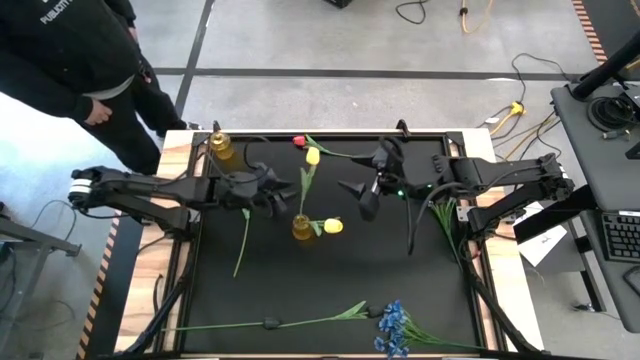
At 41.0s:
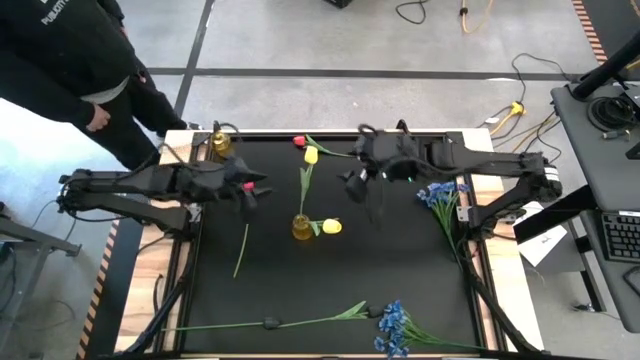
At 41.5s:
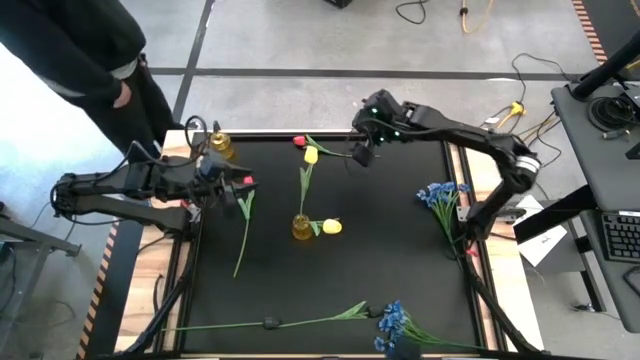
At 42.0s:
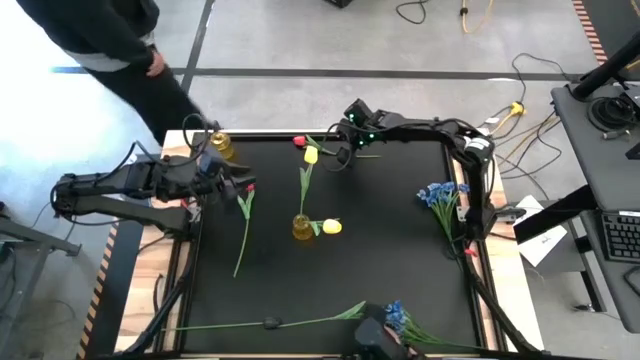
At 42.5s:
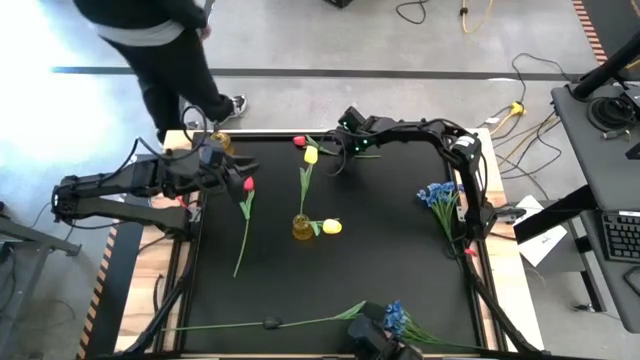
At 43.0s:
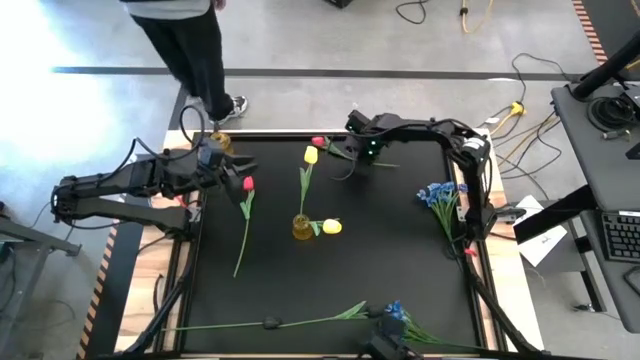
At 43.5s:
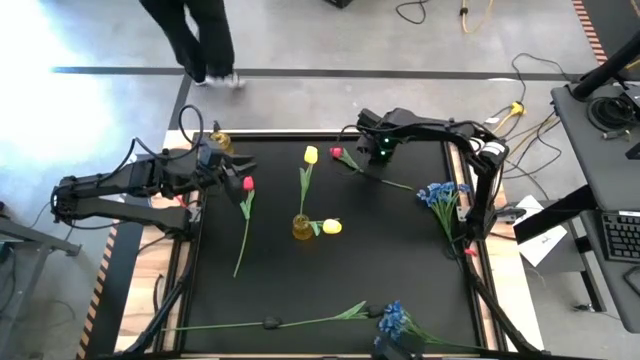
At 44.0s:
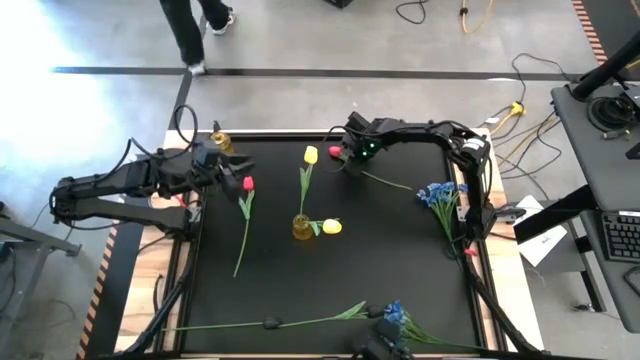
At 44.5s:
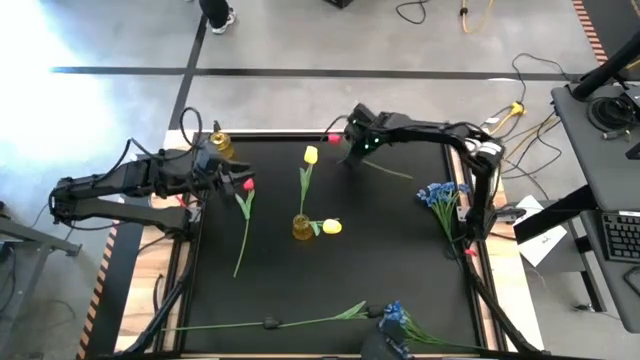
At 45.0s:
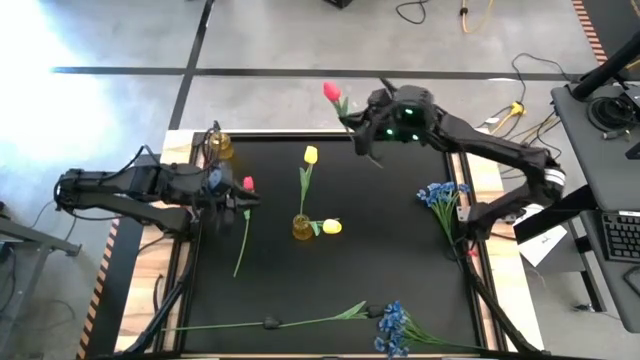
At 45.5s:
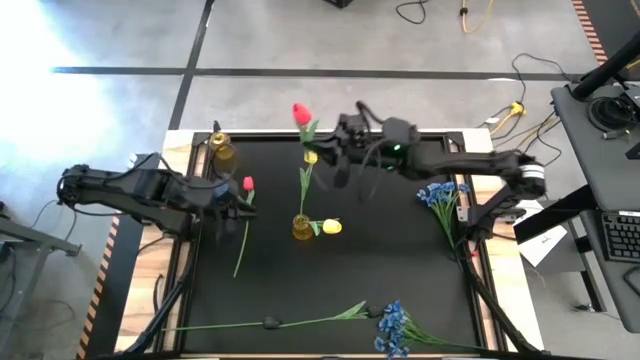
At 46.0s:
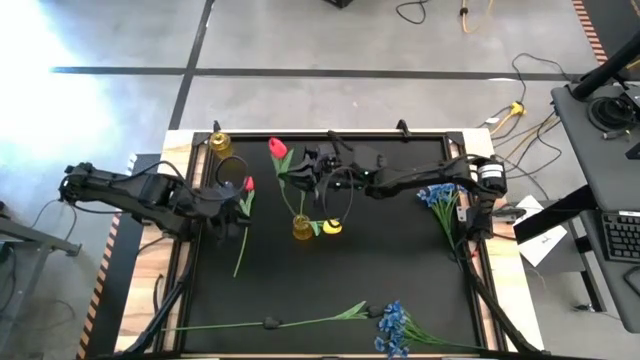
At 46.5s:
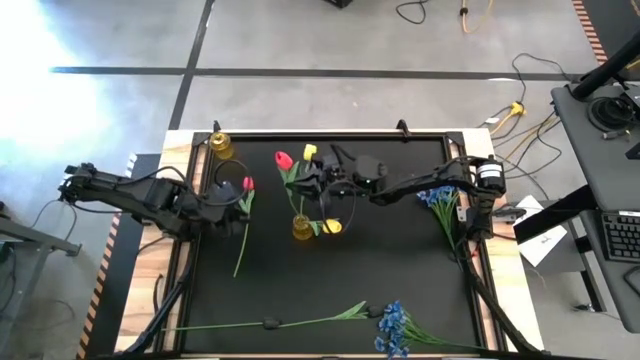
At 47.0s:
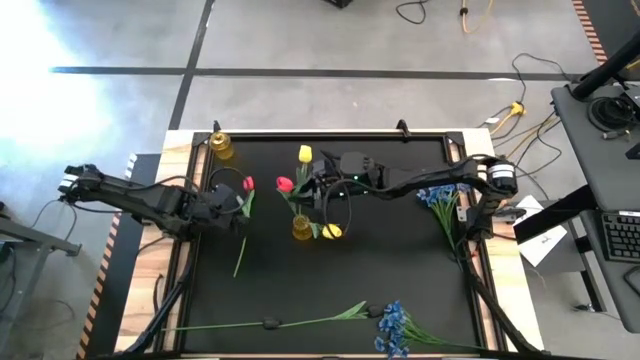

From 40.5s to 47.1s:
Task: Sort flowers into vase by color
Put the top red tulip into the yellow vase

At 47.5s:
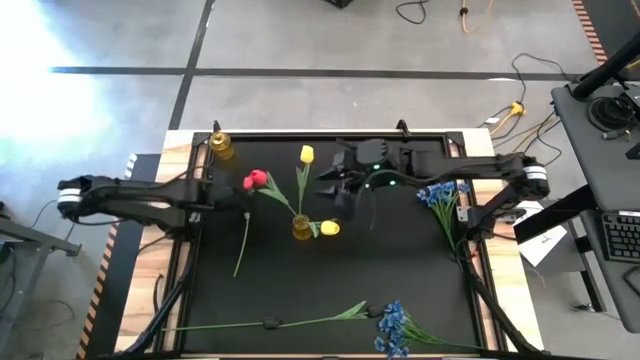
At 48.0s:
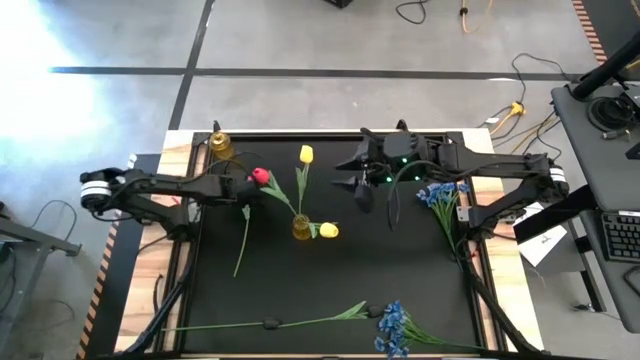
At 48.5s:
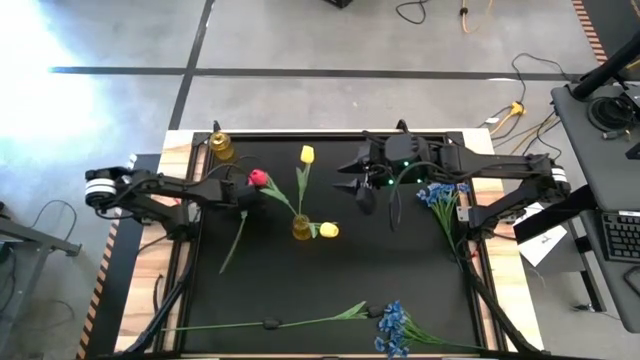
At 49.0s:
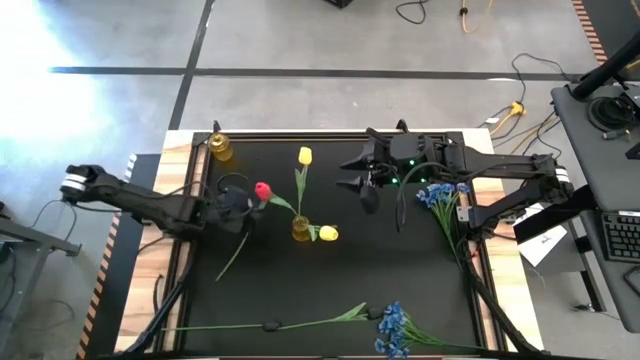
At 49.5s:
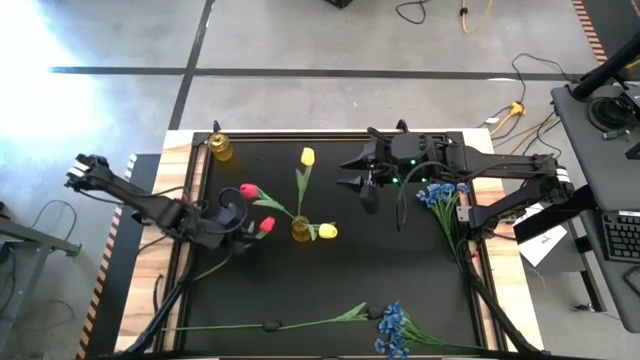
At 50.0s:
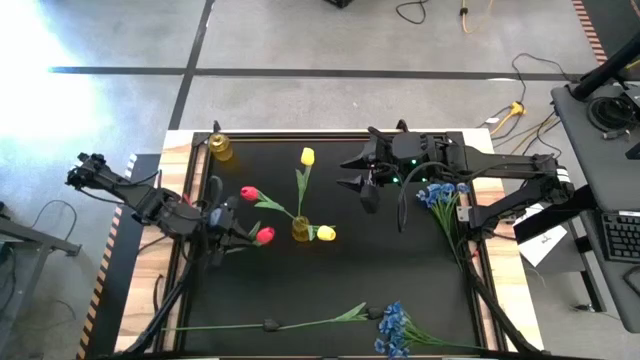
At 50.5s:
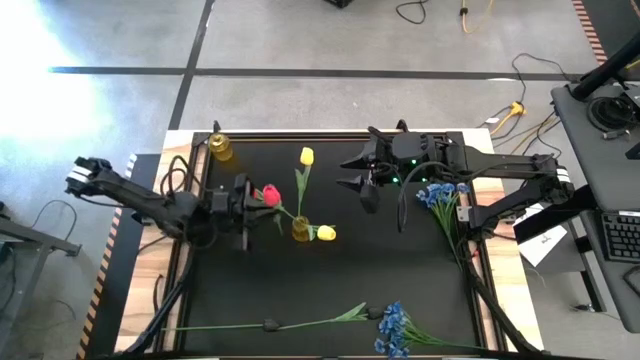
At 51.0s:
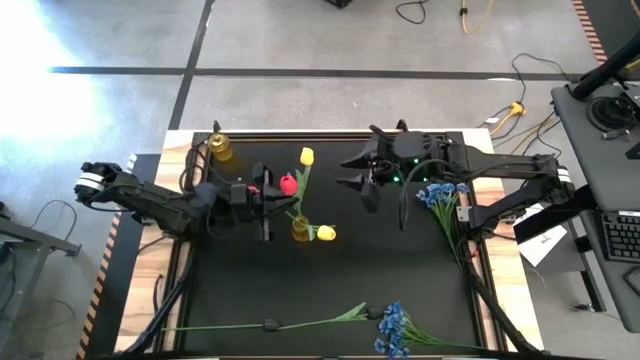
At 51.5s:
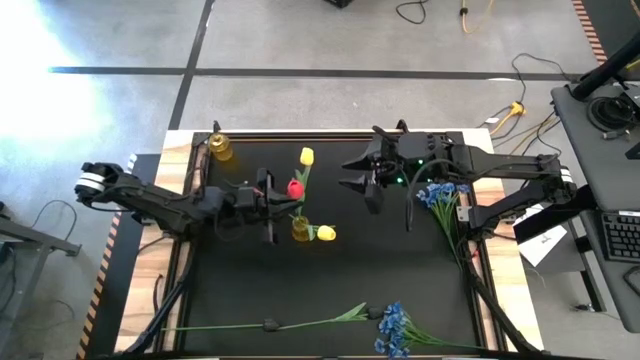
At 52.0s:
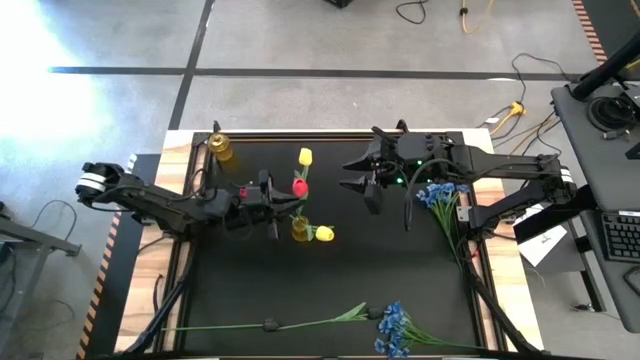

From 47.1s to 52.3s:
Put the red tulip into the bottom vase

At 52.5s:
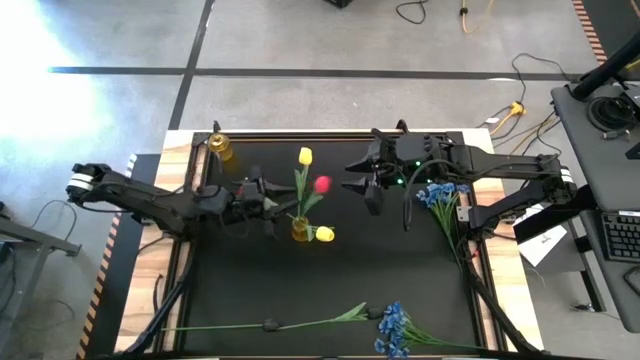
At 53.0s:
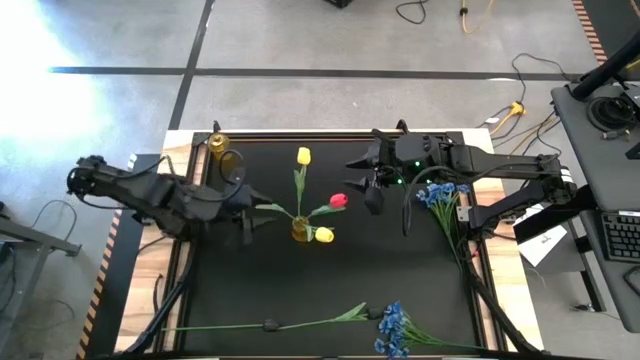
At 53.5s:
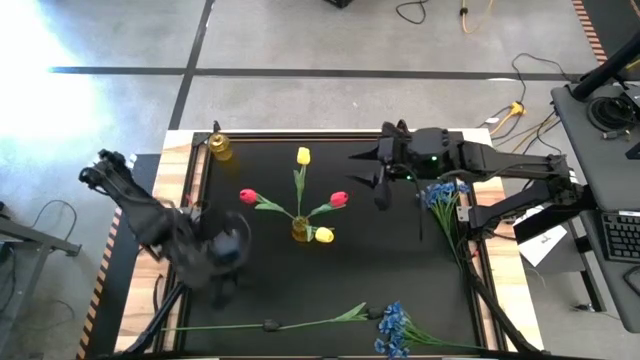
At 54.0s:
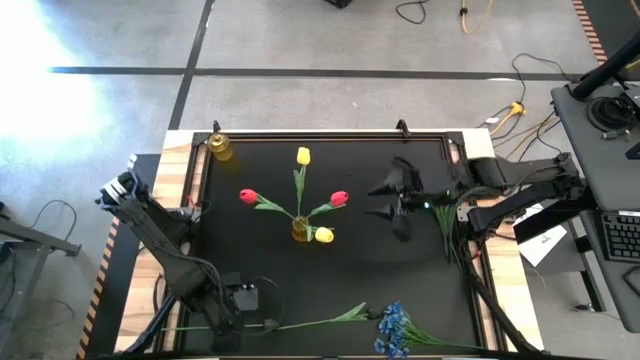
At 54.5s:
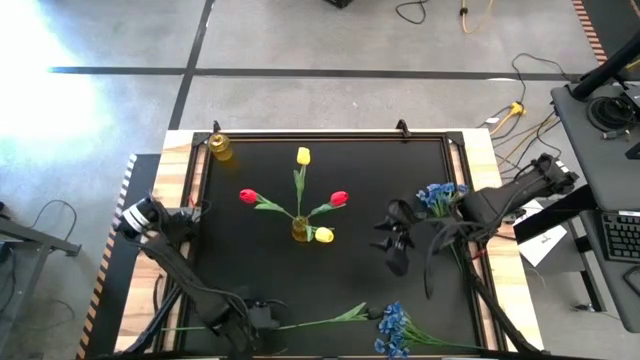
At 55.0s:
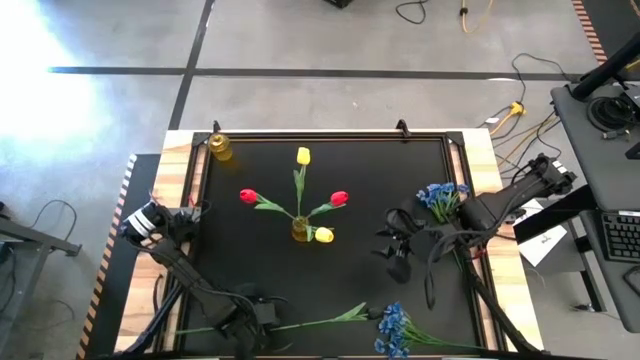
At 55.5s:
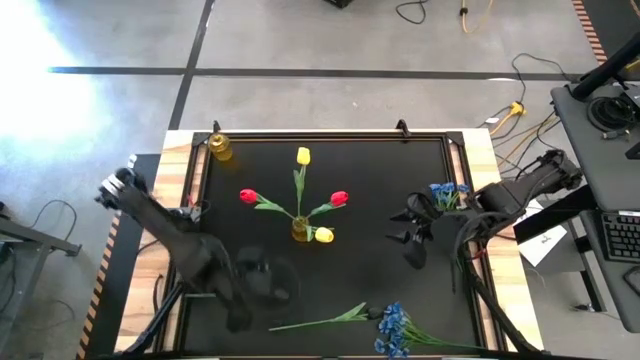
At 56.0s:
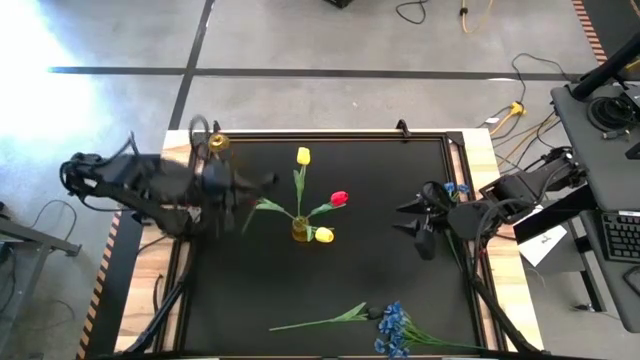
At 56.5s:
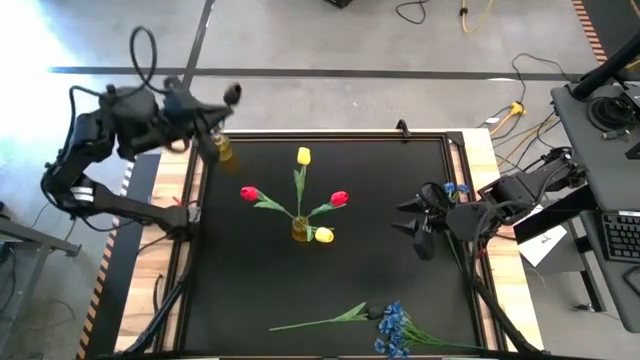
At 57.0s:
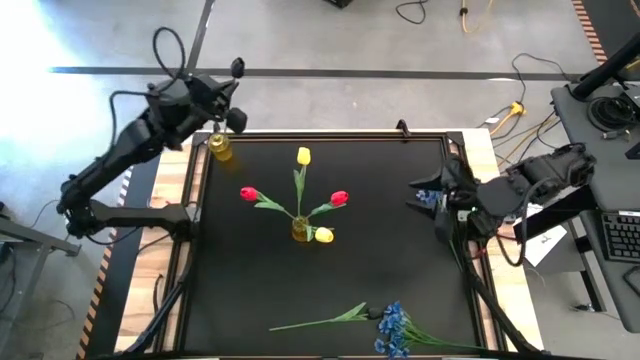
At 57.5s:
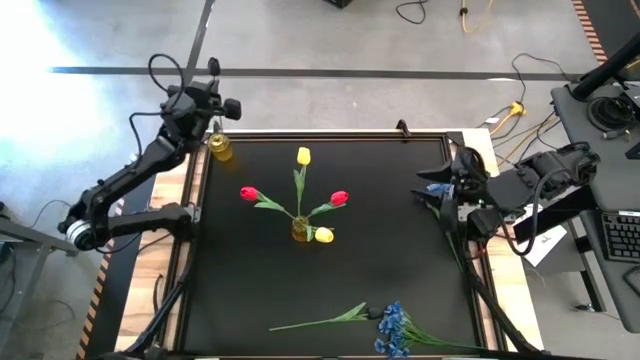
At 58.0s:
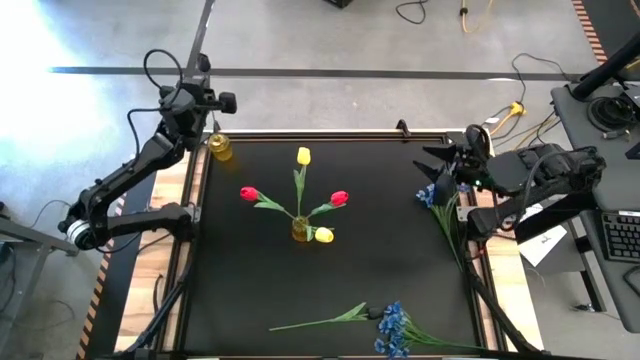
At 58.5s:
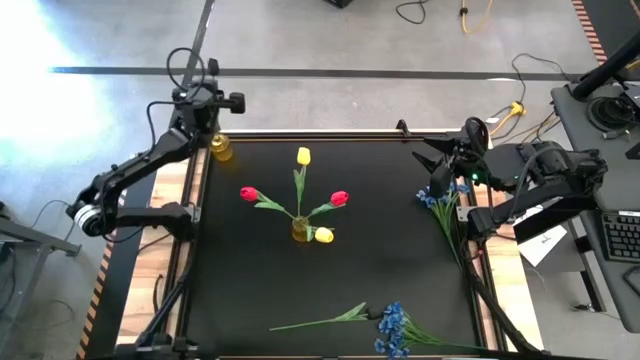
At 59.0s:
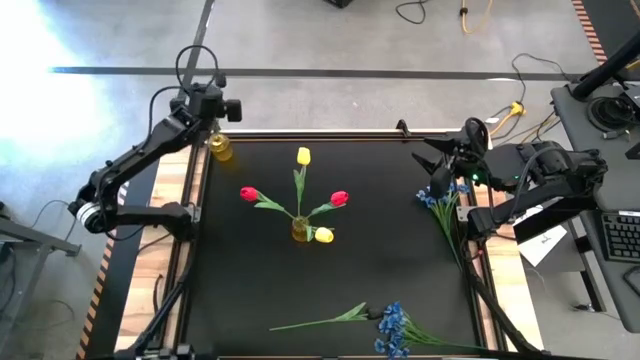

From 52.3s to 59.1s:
Put the left black tulip into the top vase

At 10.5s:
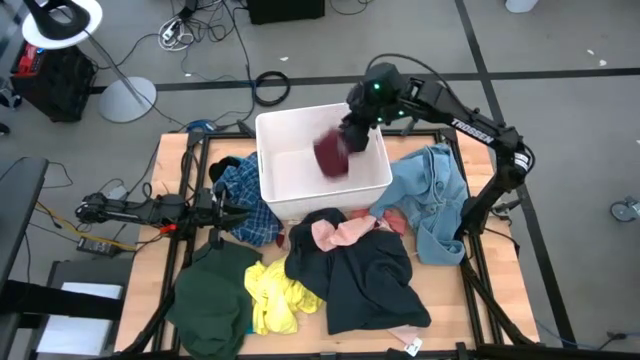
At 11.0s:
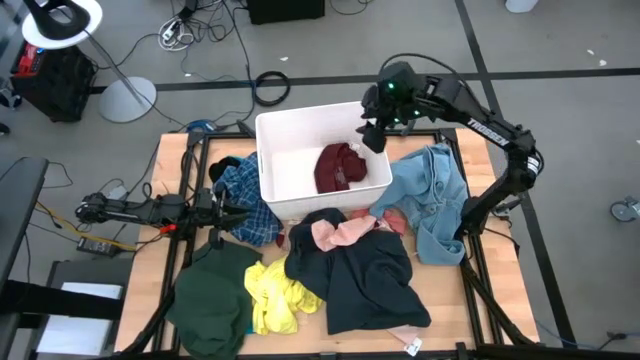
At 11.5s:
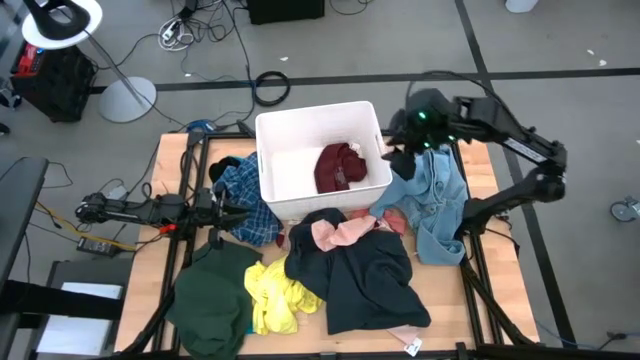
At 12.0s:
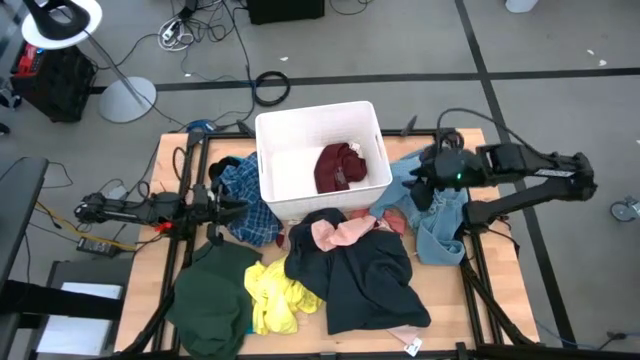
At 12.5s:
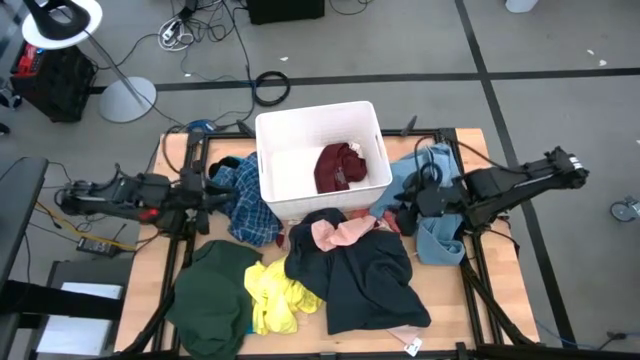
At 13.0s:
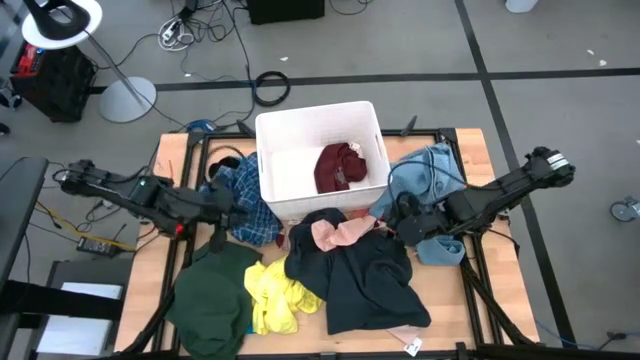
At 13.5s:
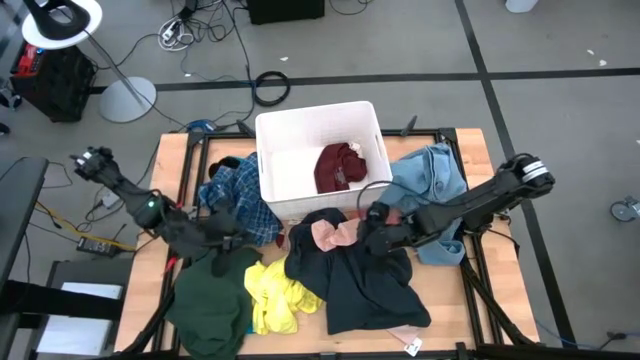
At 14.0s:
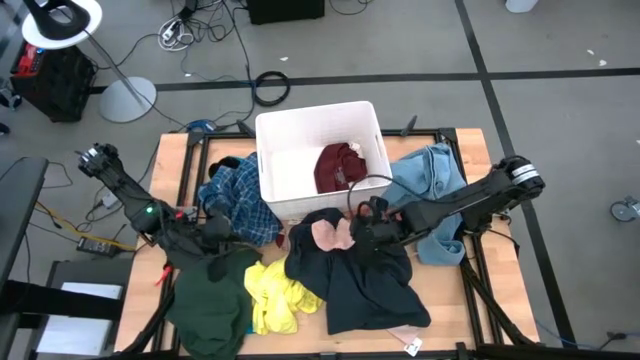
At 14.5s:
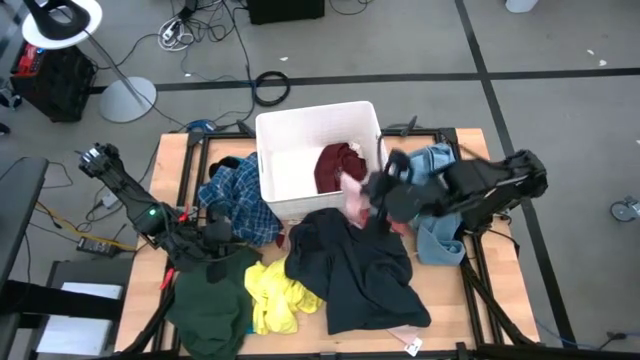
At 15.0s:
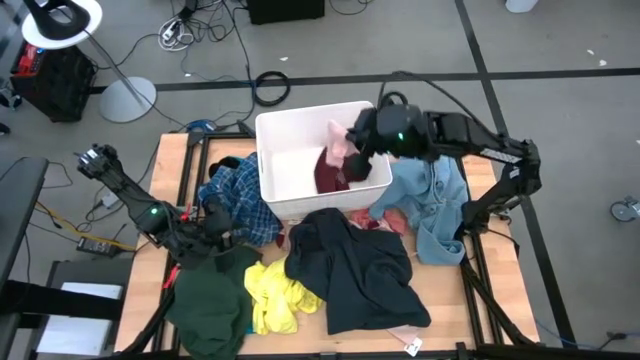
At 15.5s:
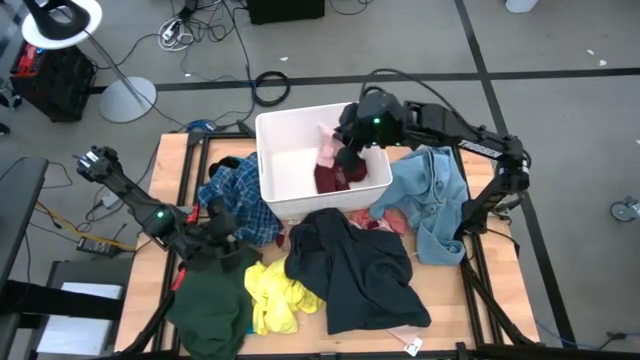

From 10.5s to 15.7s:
Task: Sort clothes
Put the pink sock into the white bin
